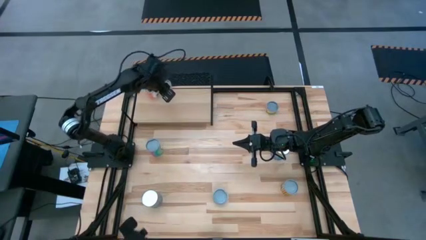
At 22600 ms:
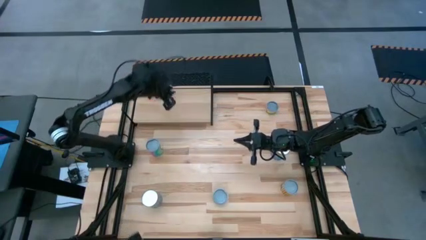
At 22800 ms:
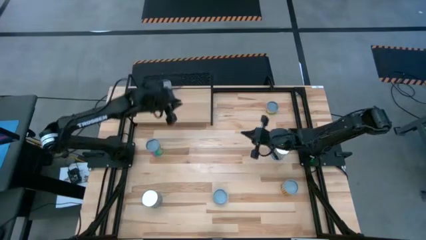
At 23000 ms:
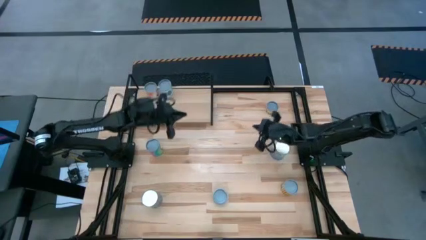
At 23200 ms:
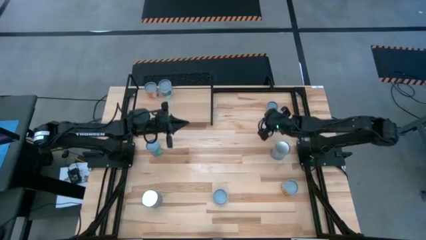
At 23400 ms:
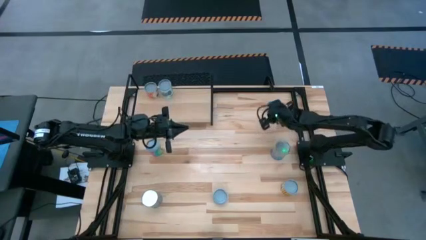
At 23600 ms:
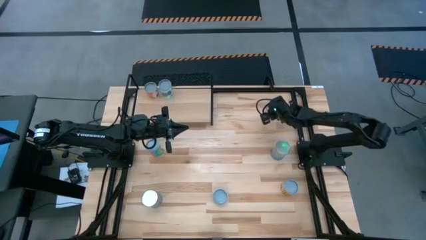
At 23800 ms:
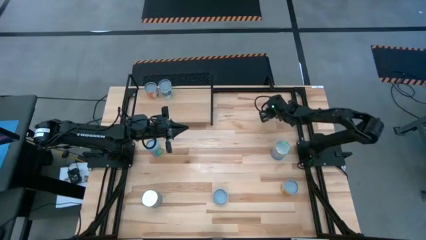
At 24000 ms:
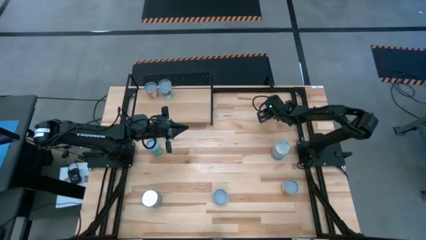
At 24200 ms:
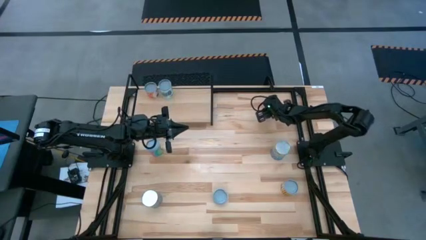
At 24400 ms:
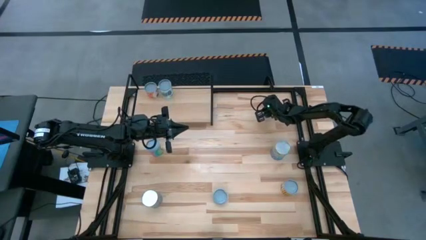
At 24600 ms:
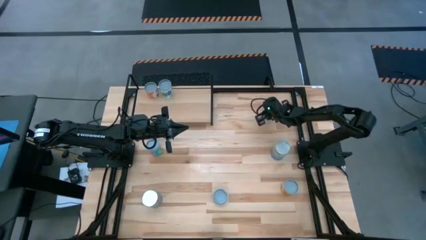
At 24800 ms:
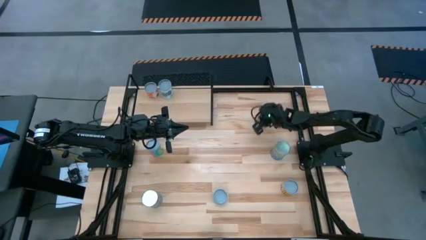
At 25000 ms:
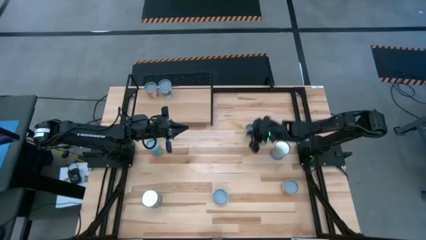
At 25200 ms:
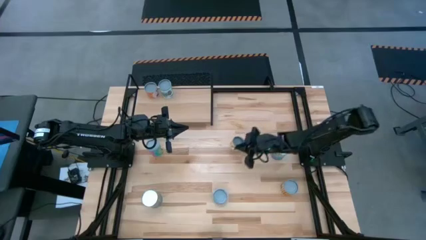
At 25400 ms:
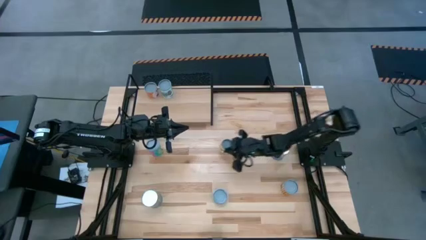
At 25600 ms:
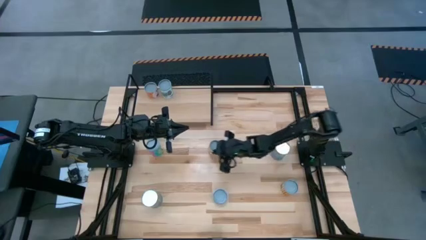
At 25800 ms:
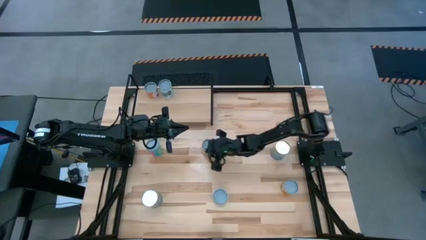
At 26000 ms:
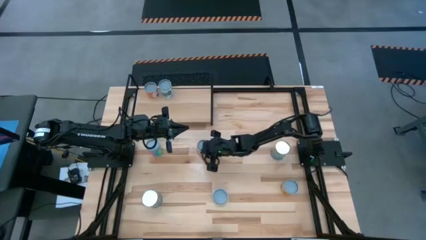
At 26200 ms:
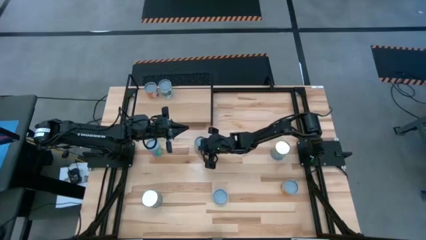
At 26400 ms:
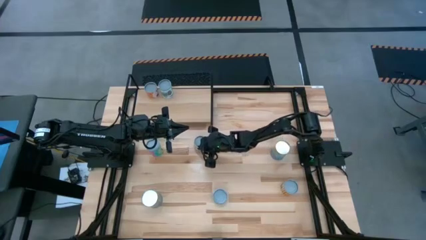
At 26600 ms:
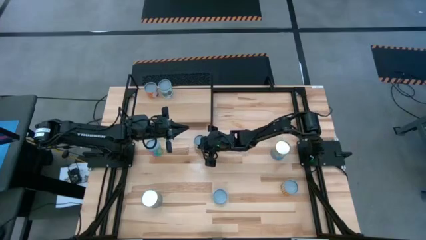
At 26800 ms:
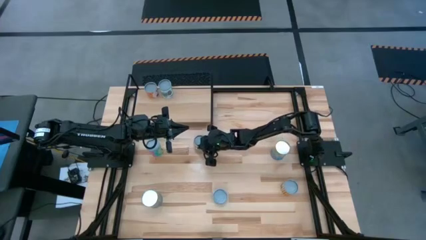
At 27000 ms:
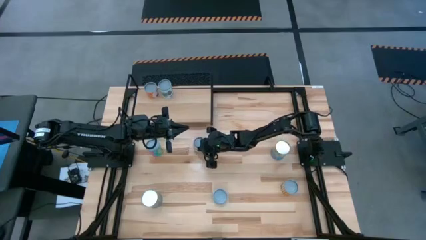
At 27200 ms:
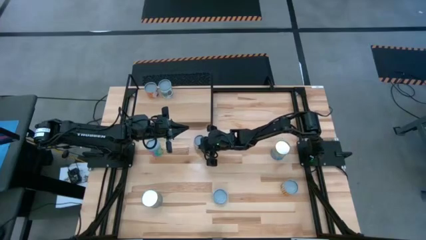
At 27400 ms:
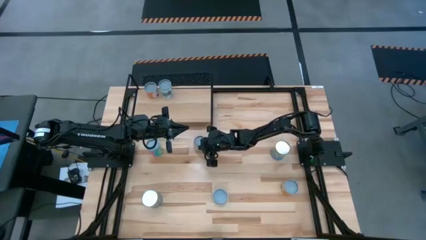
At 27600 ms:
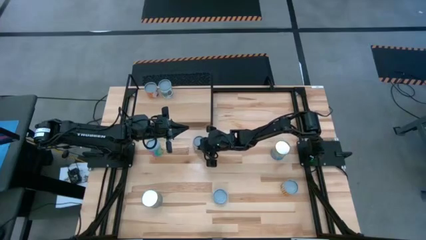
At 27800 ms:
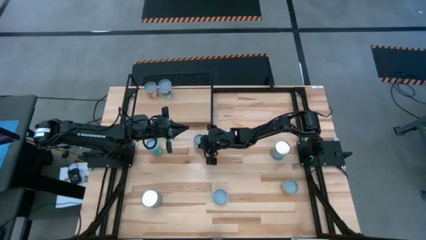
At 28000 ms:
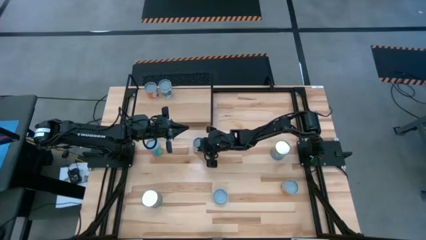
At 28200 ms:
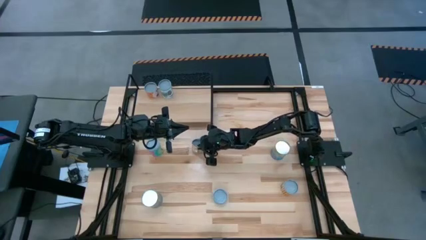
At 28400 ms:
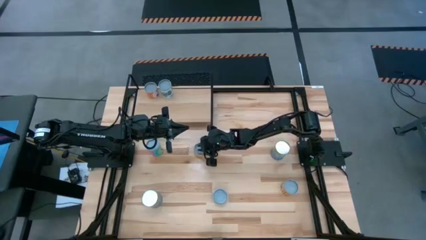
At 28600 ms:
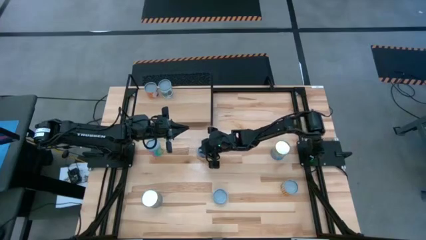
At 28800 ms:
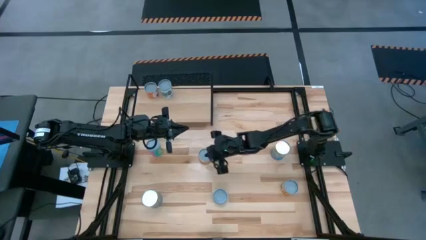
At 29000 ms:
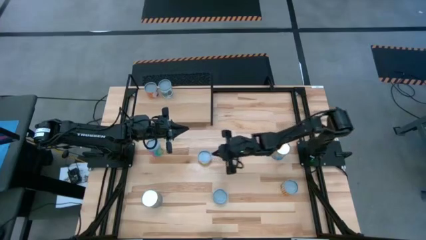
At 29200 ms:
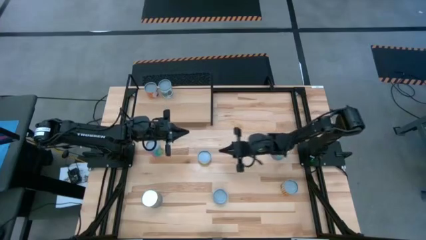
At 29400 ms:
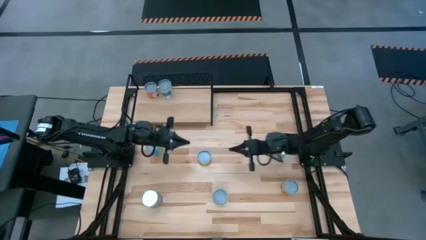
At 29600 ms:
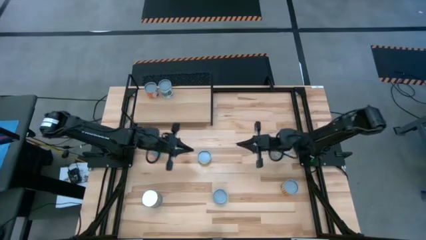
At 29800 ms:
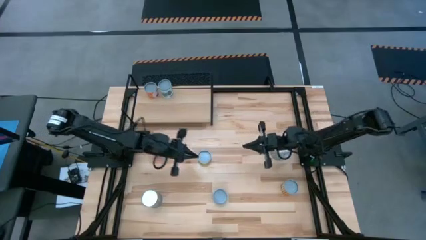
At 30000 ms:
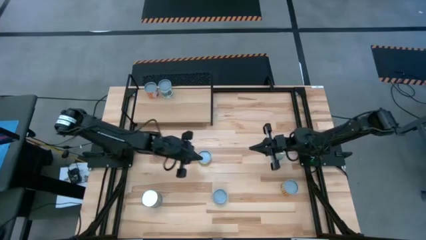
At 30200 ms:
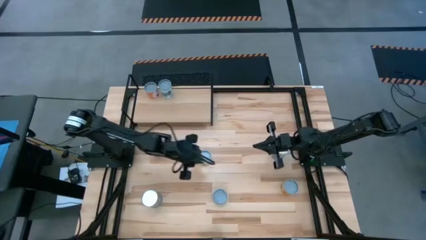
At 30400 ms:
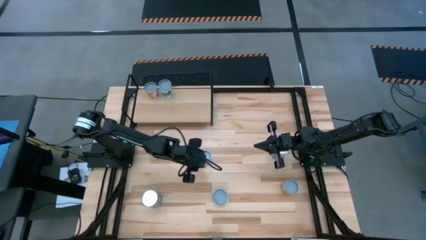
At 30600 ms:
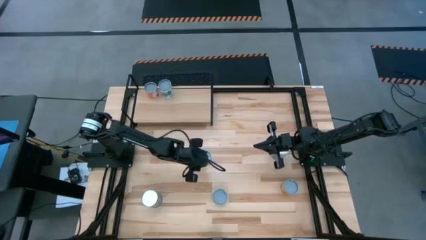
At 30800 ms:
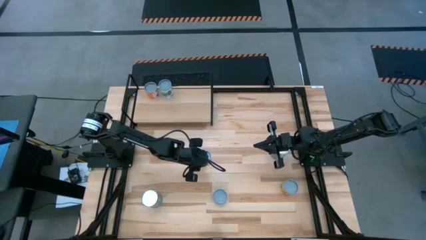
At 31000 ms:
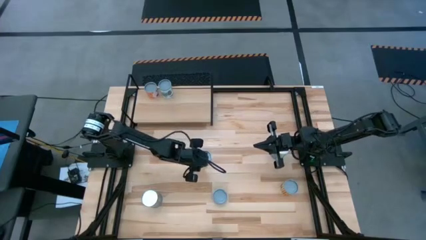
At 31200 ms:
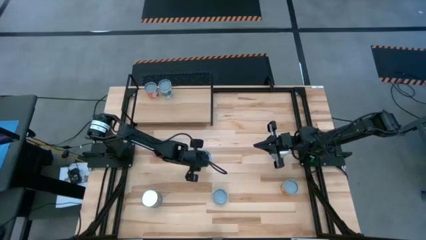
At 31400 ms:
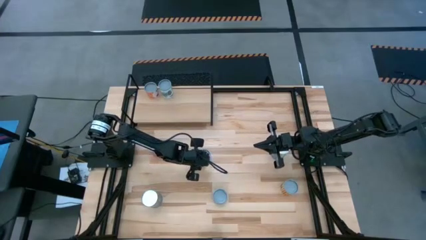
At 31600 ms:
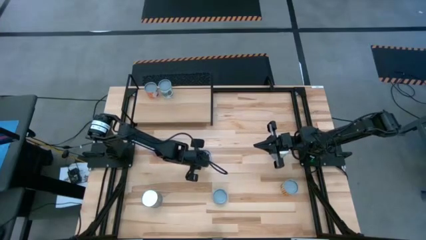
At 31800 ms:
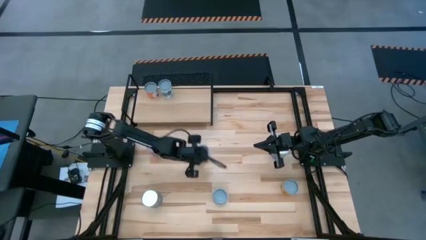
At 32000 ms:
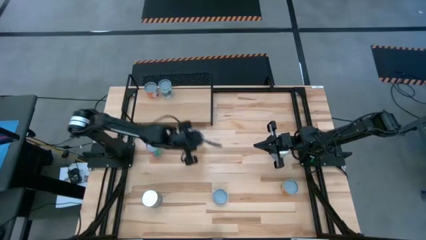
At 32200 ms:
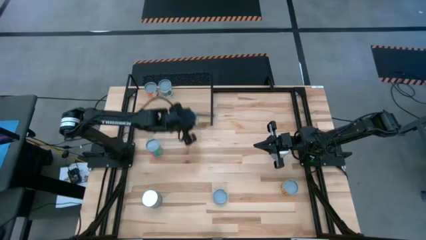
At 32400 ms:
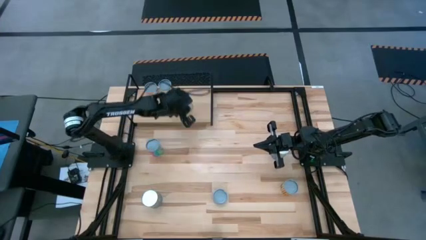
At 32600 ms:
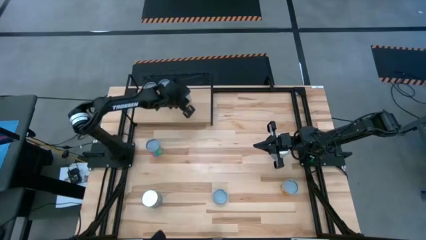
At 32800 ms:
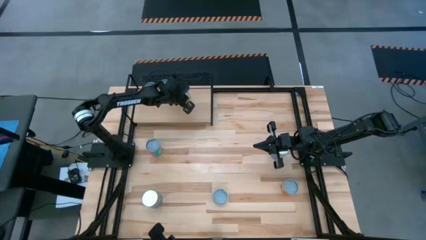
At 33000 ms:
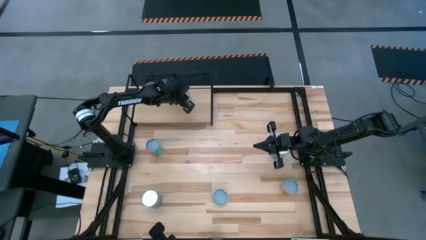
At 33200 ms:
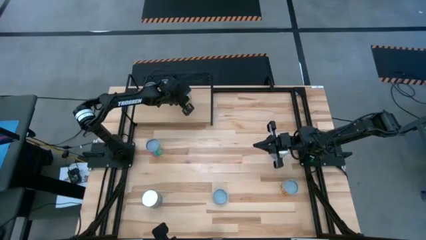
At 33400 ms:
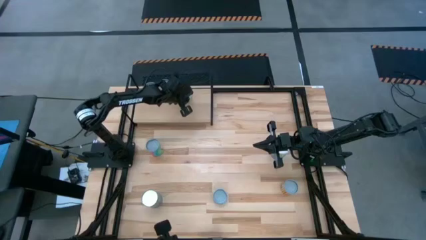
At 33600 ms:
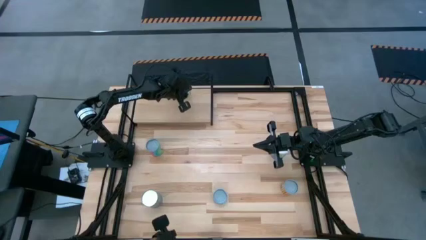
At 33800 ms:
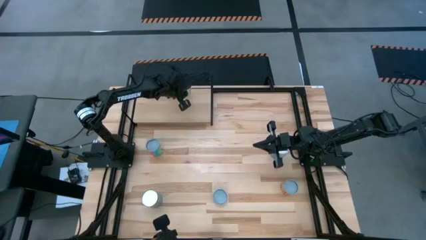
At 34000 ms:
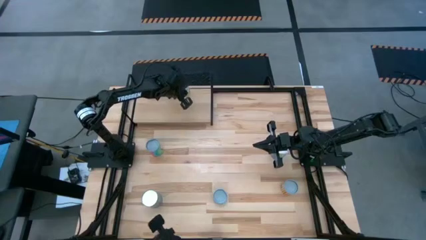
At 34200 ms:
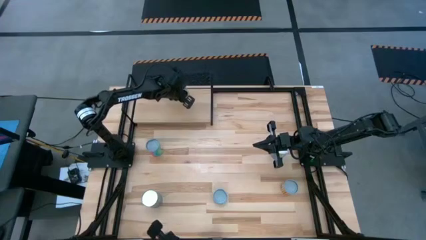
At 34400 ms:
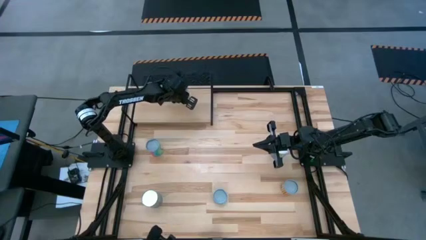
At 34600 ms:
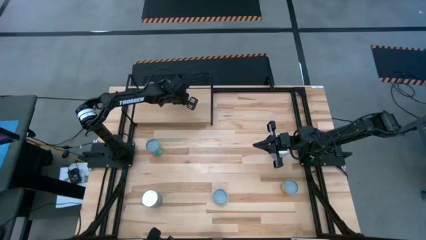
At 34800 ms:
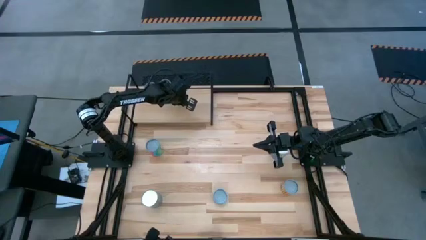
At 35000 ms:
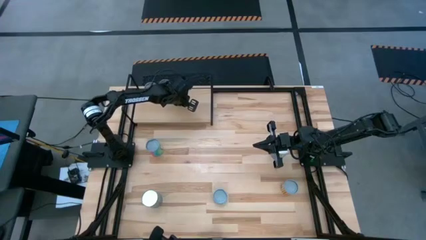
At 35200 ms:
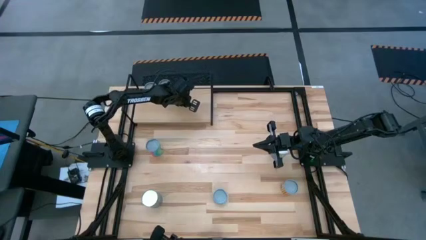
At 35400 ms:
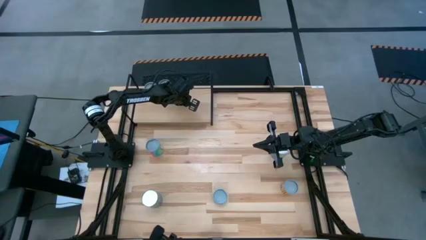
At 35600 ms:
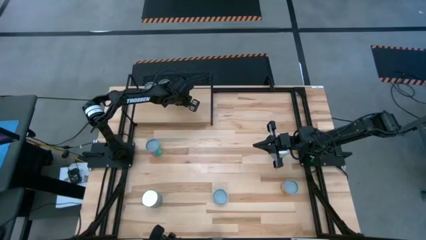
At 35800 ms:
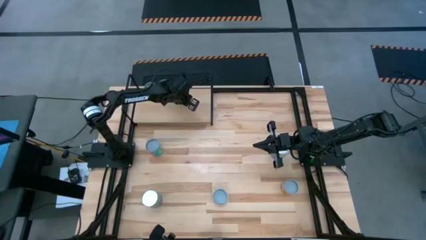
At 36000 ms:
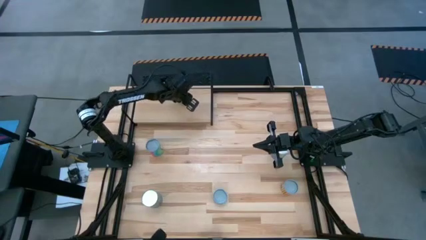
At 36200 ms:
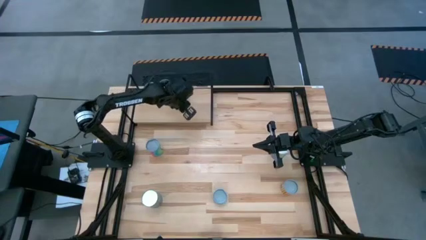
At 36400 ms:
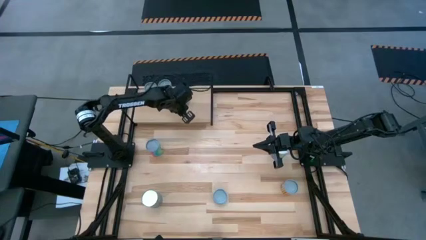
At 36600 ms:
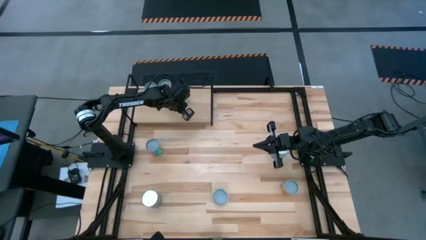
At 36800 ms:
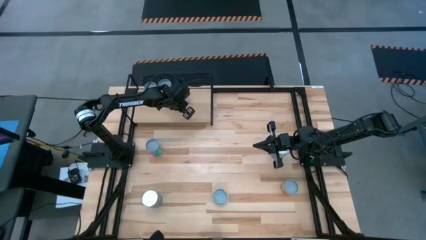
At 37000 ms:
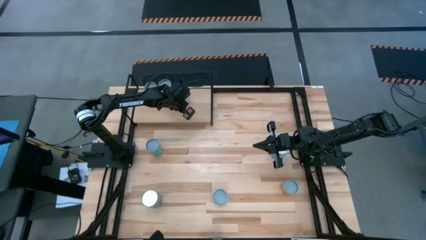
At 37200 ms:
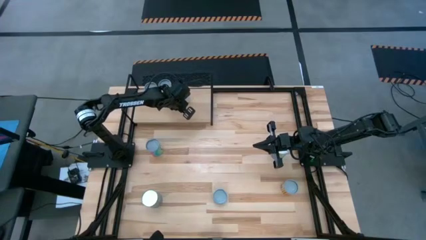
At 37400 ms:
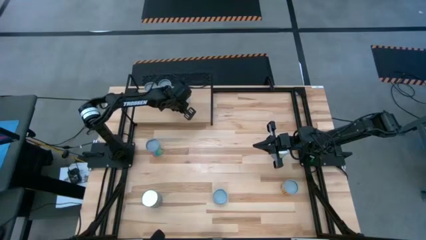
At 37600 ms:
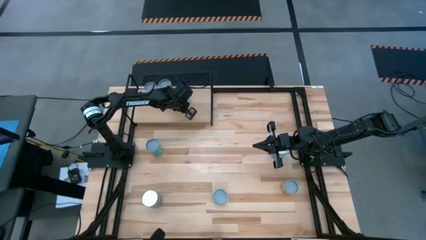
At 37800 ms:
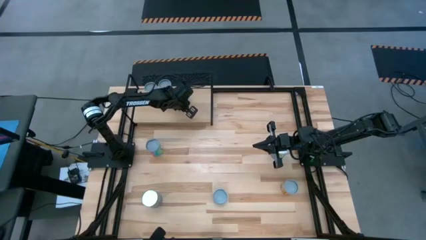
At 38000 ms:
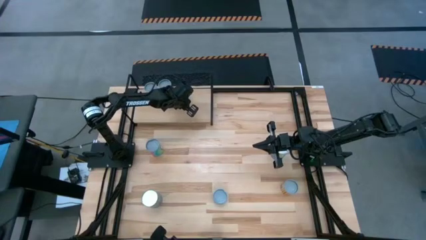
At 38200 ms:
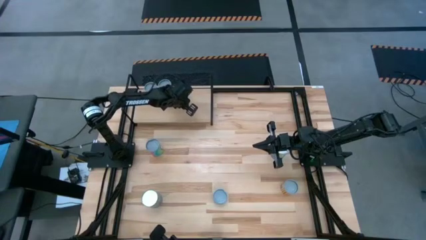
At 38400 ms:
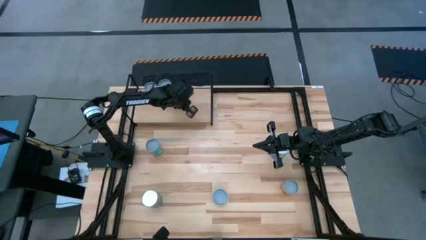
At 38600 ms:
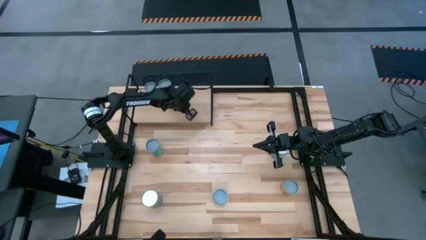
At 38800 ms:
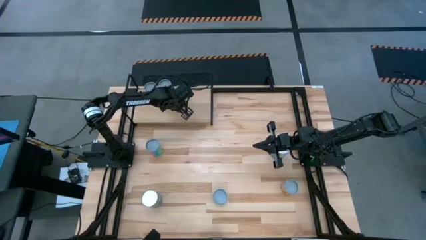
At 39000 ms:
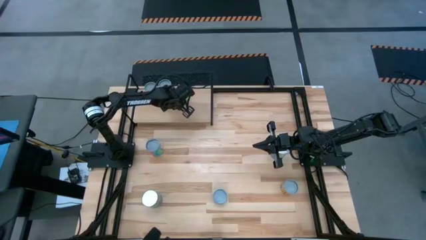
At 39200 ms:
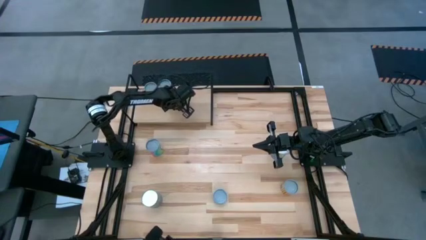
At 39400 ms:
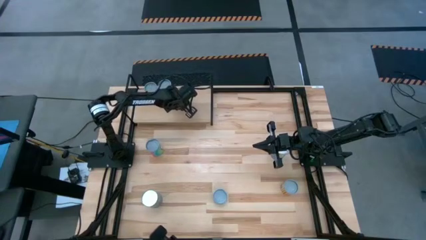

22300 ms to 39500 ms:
Task: Pick and place cans onto a shelf
Put the canned mushroom on the shelf
